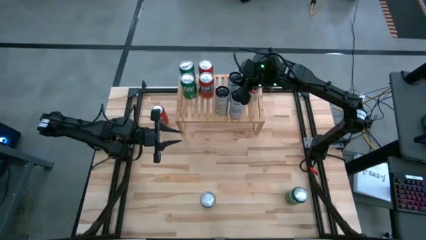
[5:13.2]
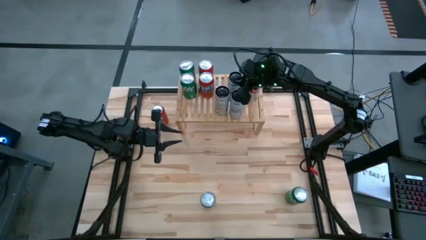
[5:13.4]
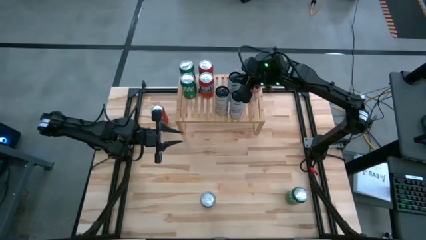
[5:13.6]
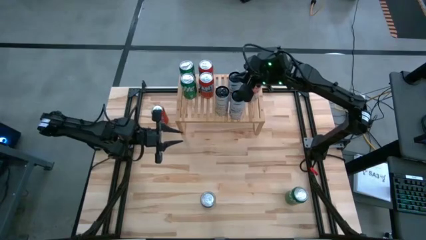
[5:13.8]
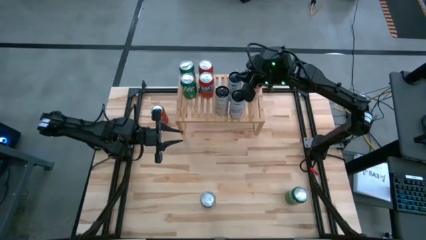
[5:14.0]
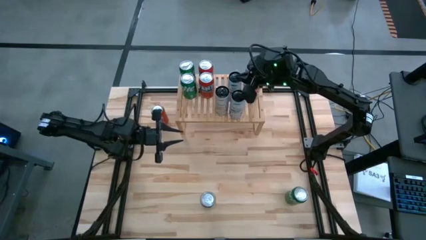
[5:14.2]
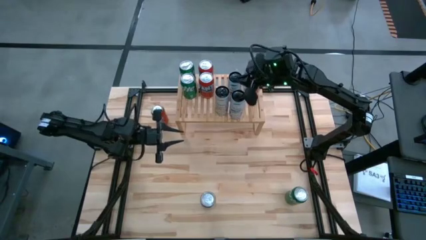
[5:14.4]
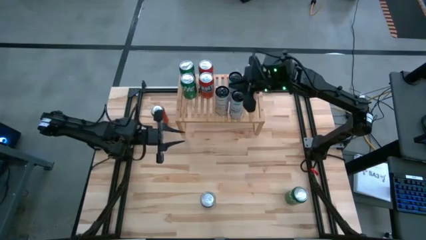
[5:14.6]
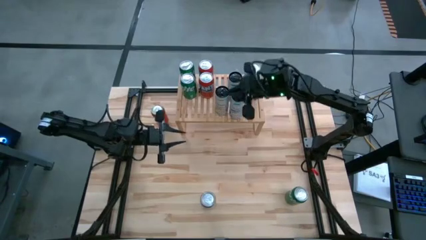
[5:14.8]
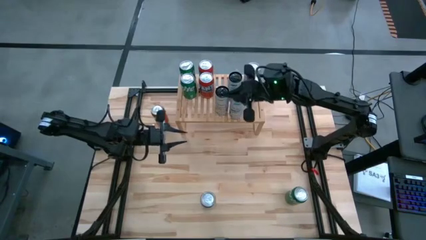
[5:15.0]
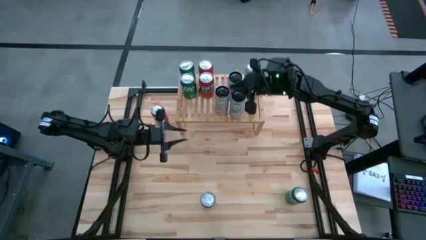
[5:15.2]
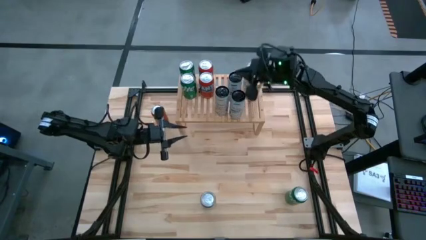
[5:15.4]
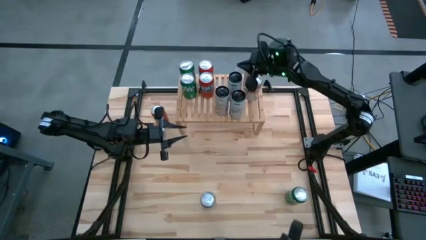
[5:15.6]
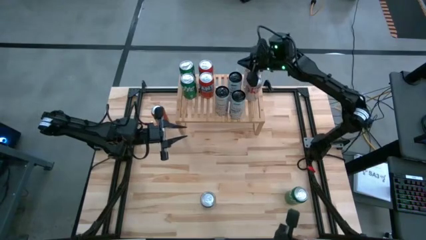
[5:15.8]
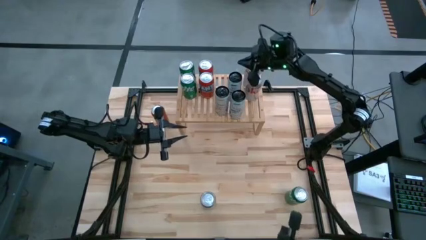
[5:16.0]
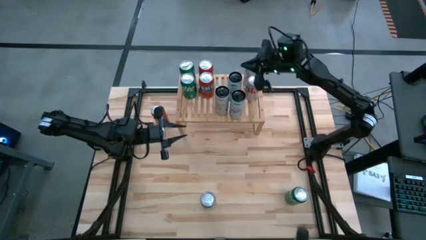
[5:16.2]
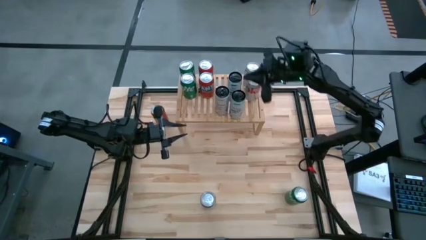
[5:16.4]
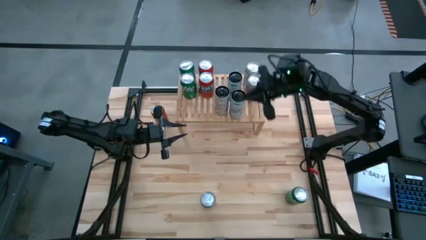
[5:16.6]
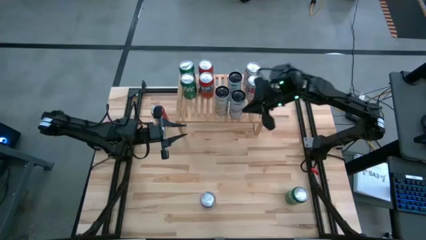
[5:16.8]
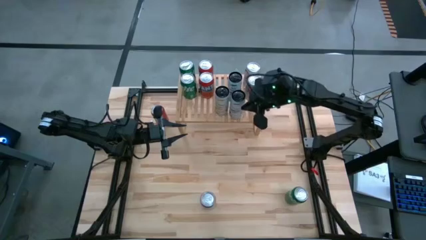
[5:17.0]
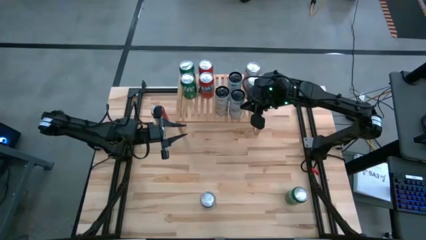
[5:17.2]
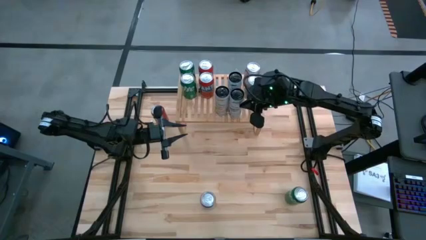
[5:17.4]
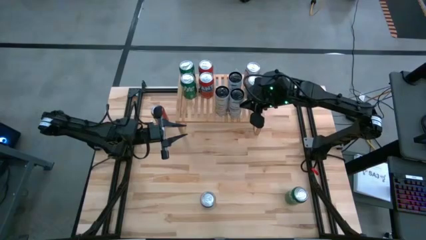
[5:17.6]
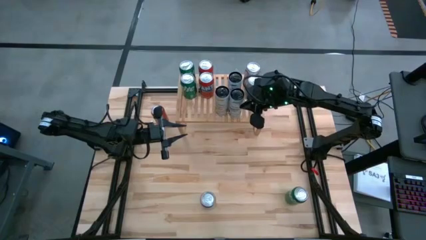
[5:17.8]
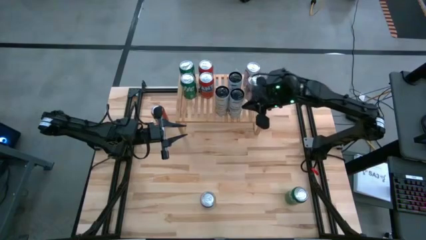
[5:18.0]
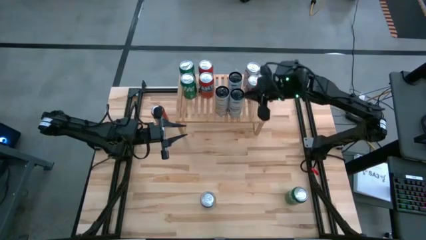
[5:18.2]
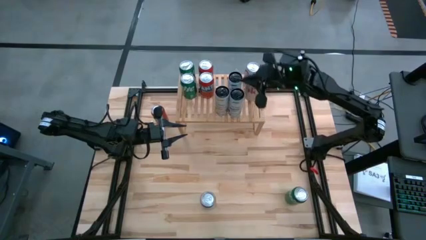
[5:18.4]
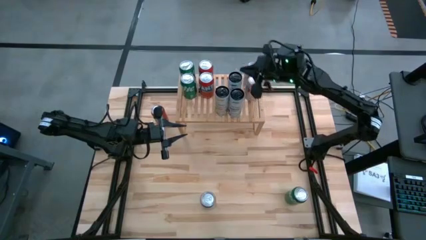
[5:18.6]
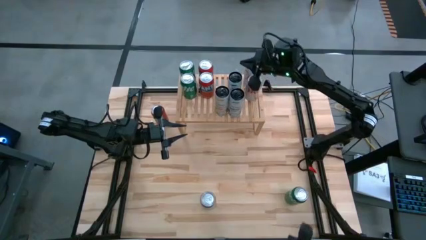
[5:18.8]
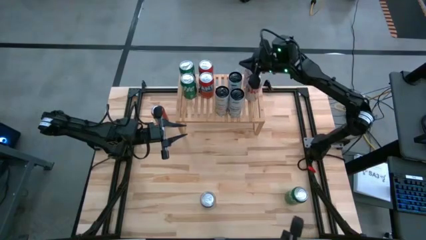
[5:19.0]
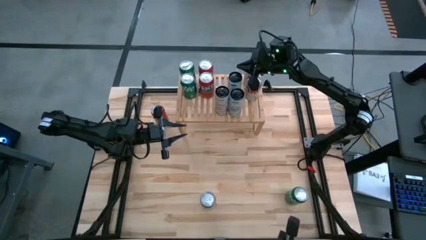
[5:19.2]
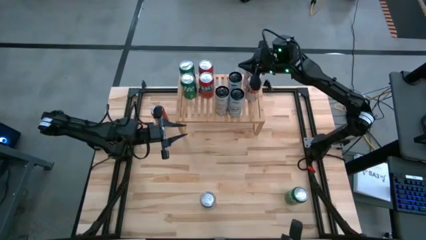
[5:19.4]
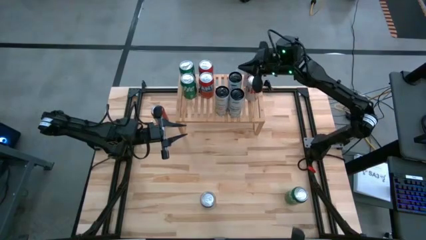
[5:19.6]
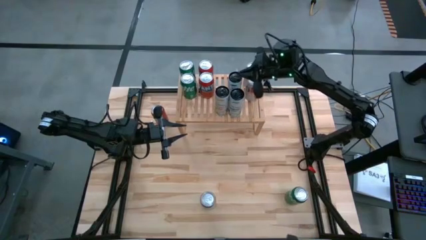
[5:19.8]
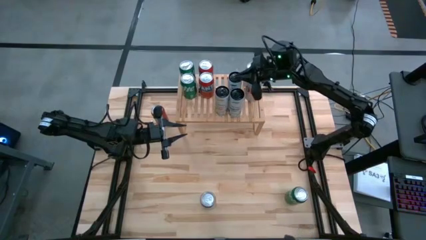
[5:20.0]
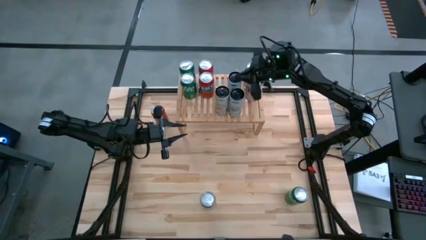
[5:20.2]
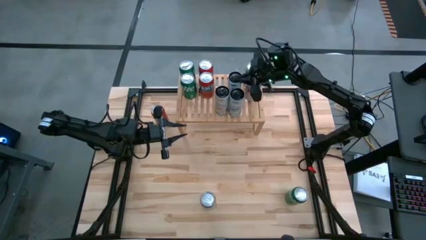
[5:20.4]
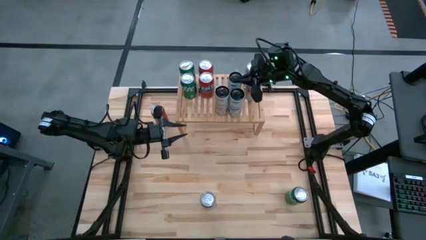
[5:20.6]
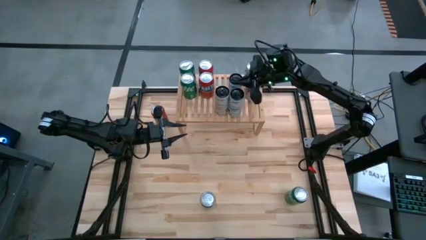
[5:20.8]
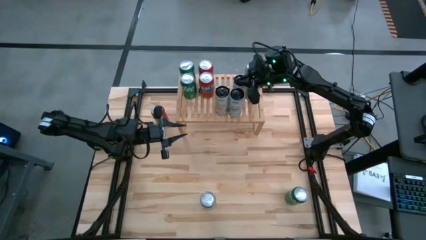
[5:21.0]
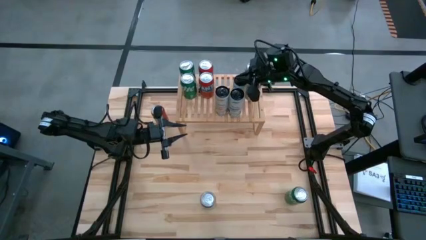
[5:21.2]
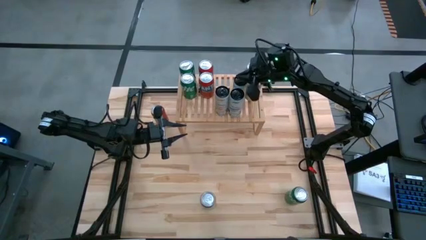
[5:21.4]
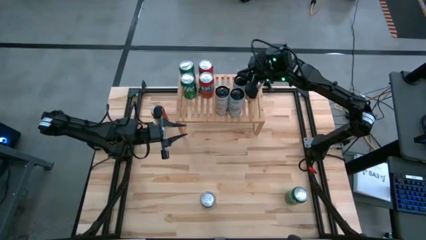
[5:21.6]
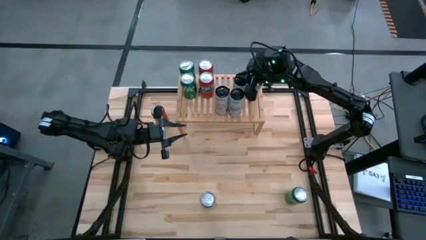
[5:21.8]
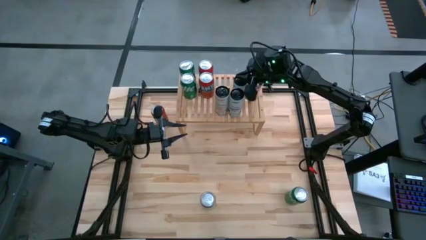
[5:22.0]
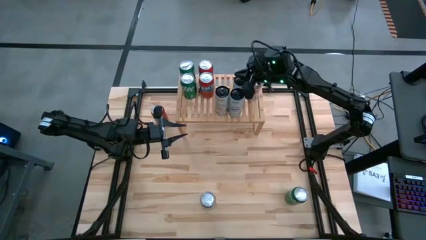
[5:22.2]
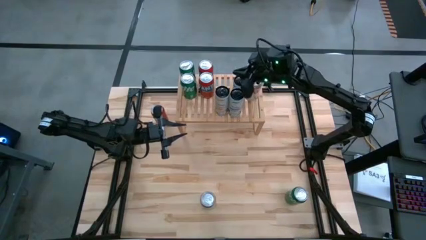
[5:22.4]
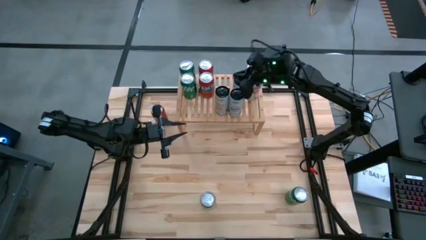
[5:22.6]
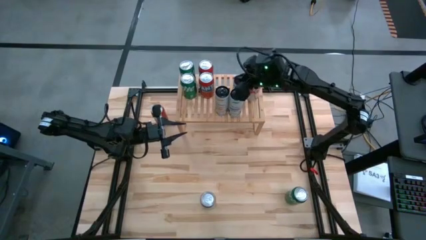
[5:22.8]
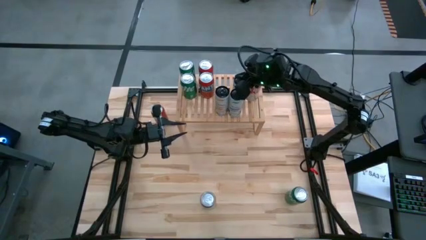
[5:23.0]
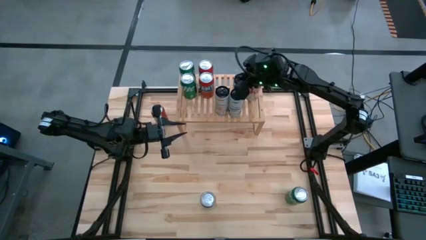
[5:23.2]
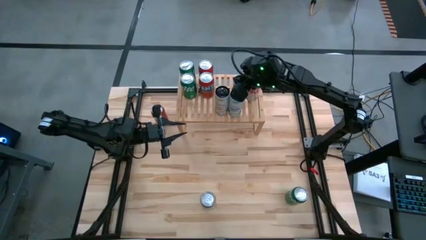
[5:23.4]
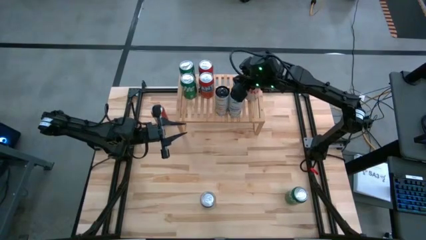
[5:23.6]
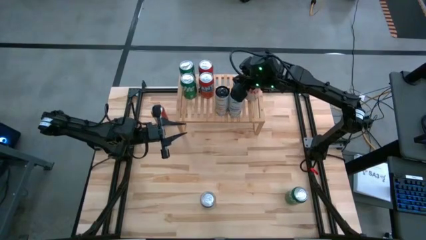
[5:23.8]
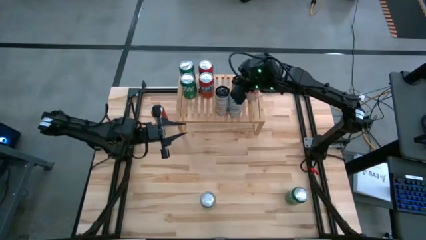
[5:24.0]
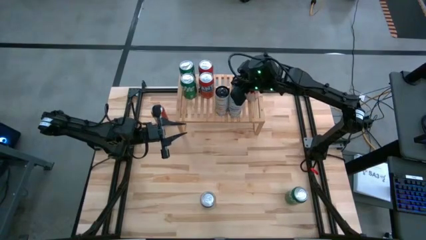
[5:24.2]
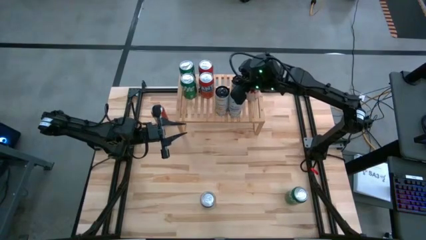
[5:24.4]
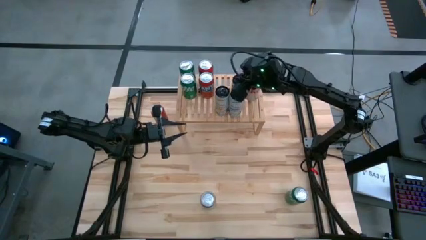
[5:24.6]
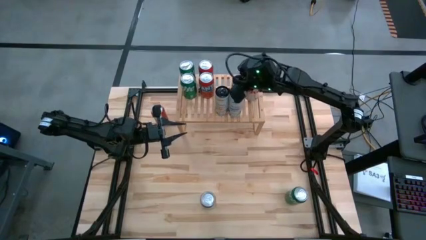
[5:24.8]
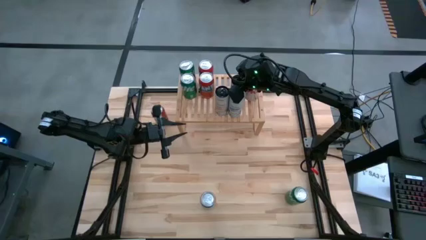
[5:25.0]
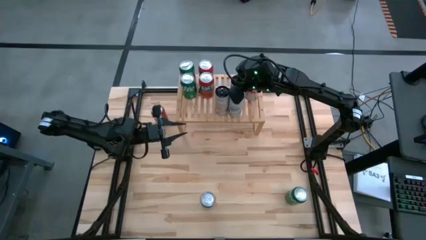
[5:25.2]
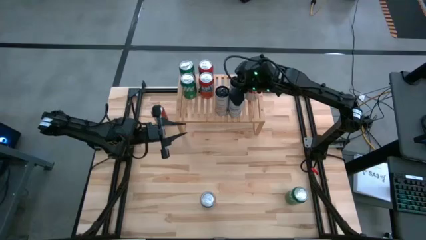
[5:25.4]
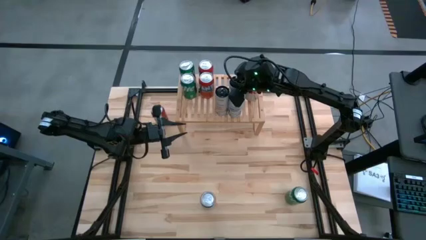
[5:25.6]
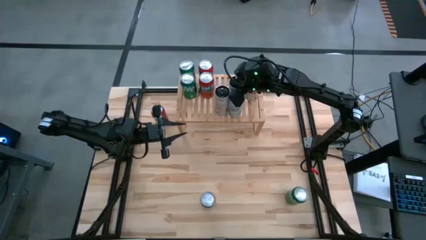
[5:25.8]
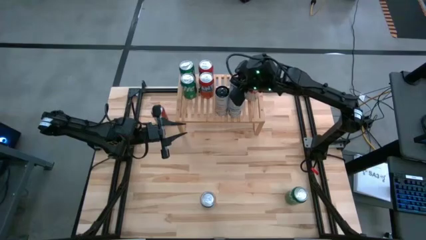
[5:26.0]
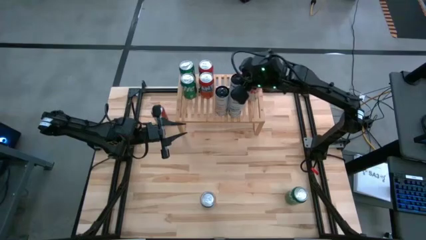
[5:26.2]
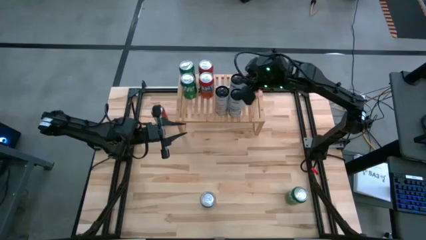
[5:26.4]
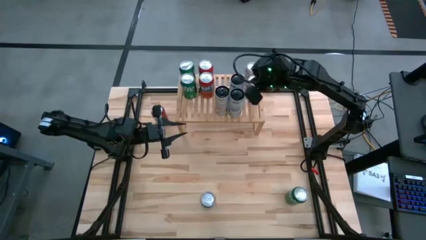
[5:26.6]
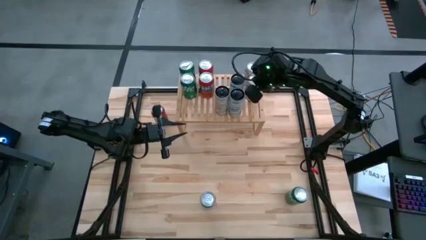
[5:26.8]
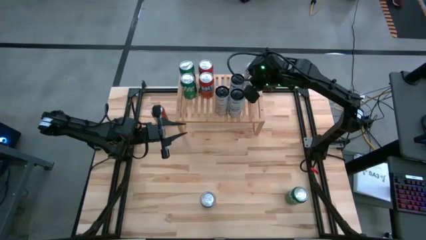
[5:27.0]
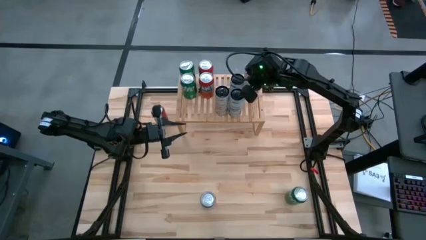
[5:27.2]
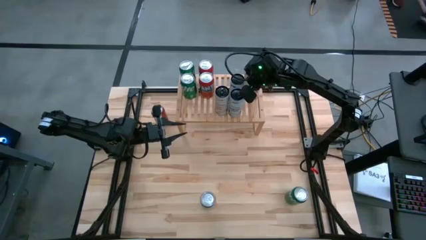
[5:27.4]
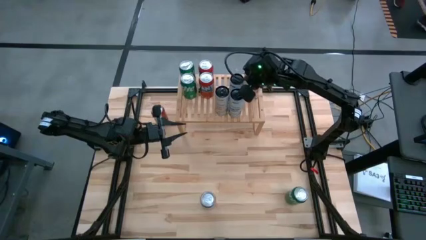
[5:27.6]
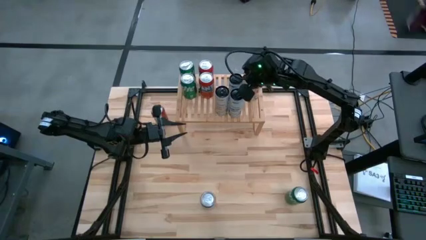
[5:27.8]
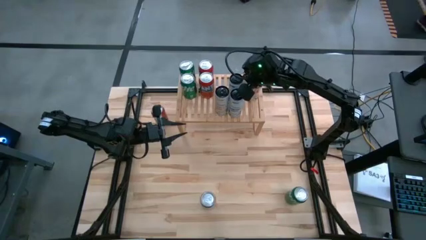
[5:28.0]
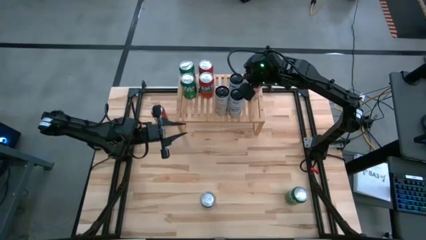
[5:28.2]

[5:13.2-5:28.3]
Task: Place canned beverage on shelf
Adjust the soda cans on the shelf
